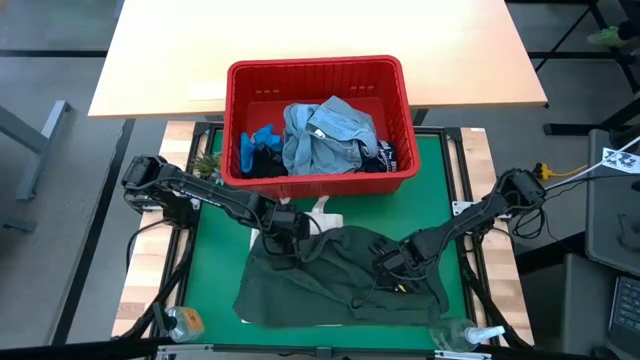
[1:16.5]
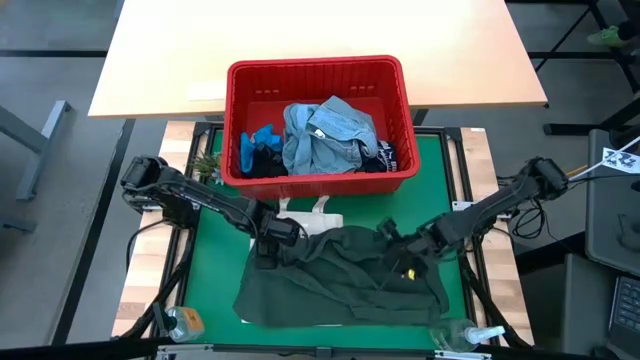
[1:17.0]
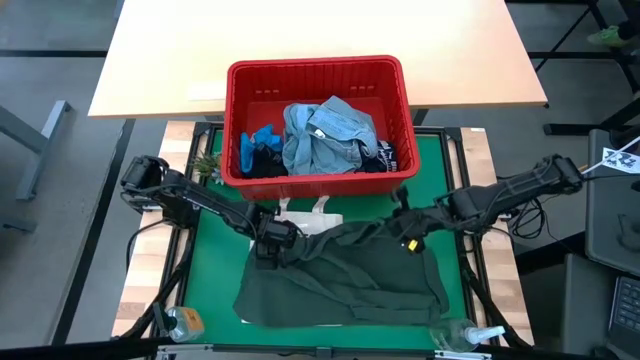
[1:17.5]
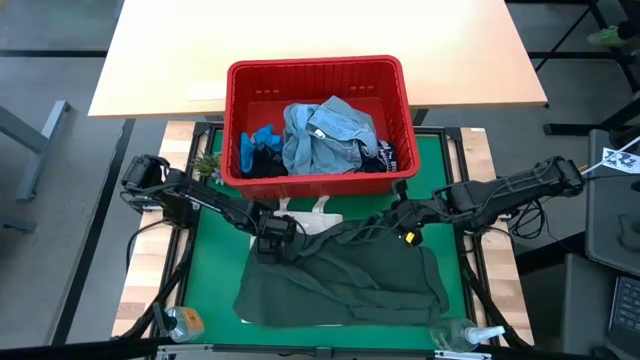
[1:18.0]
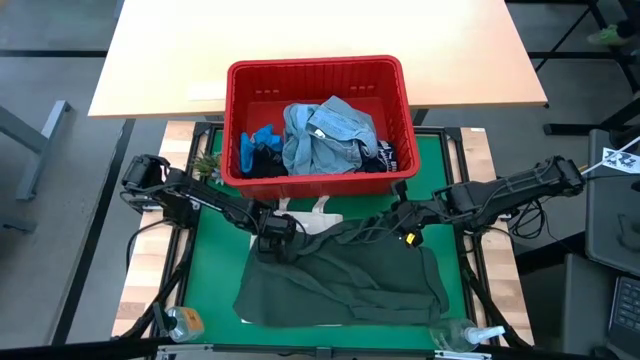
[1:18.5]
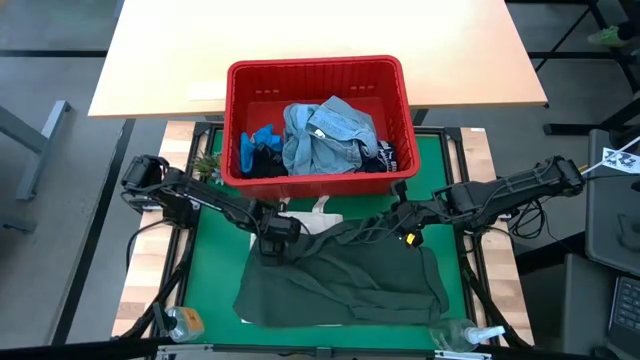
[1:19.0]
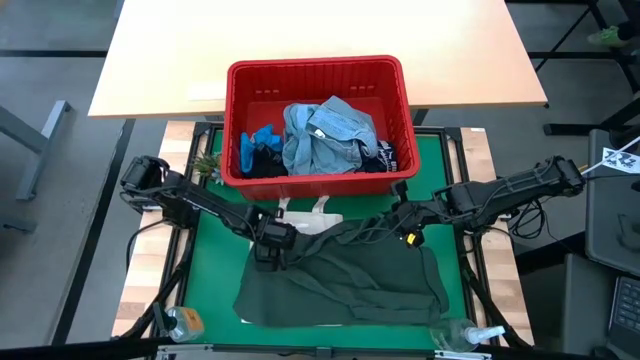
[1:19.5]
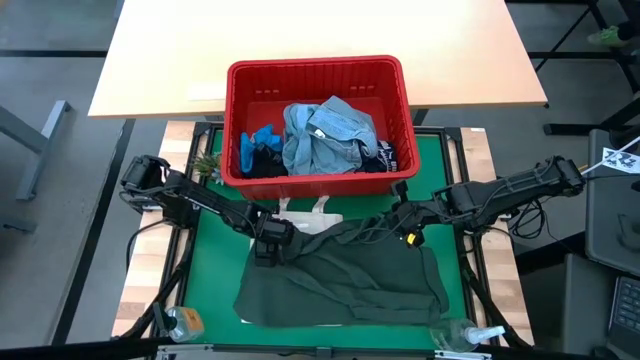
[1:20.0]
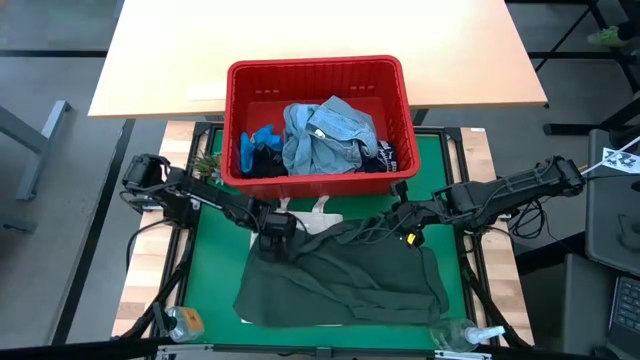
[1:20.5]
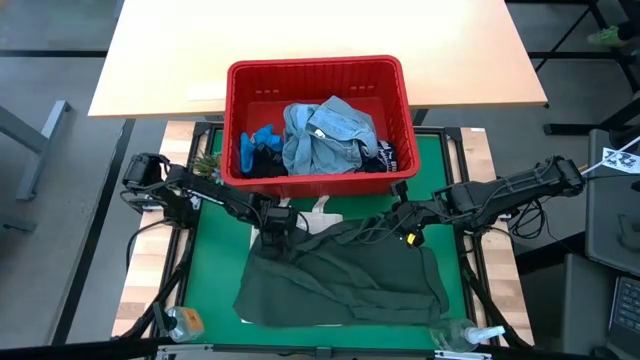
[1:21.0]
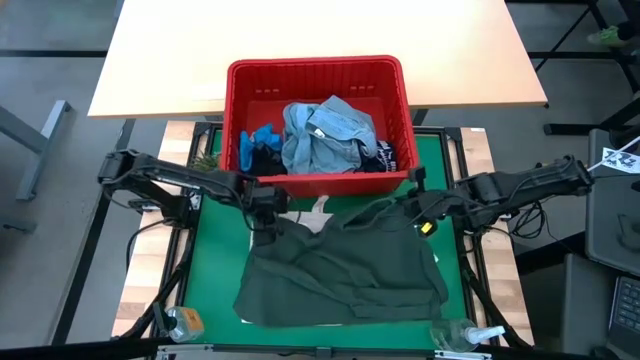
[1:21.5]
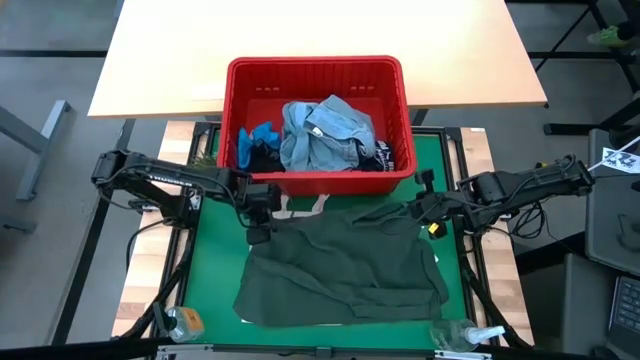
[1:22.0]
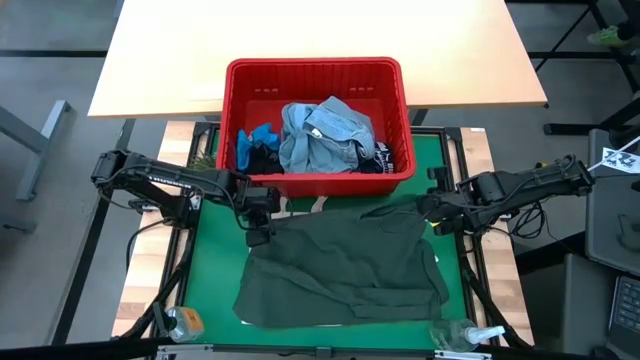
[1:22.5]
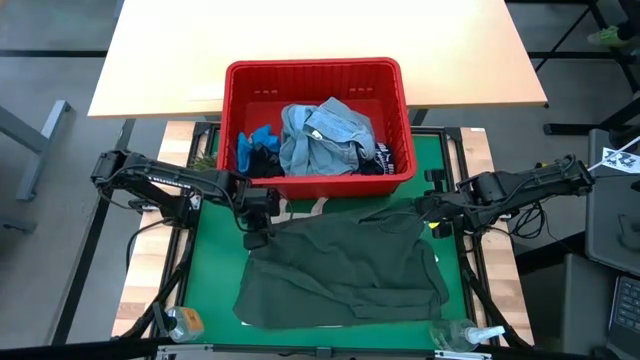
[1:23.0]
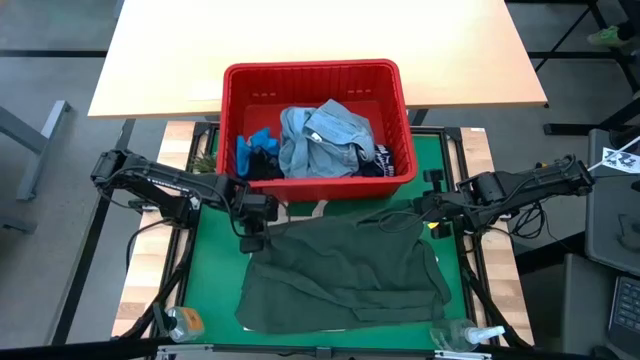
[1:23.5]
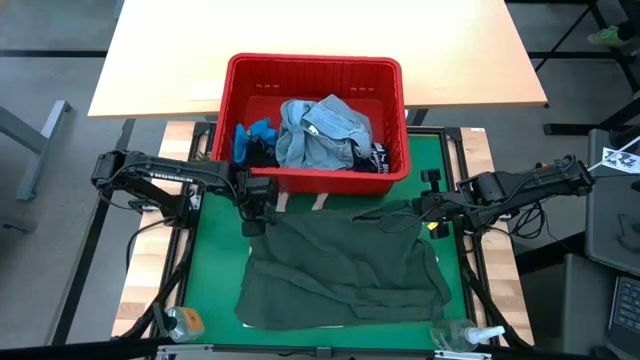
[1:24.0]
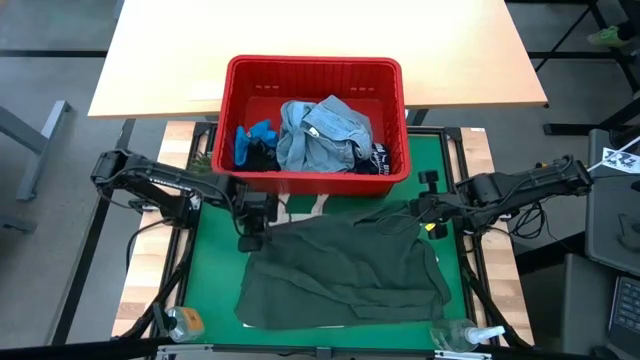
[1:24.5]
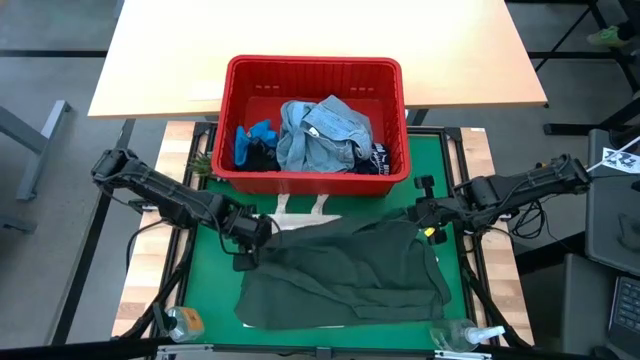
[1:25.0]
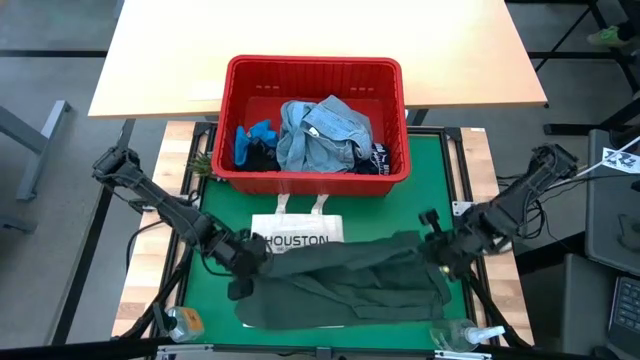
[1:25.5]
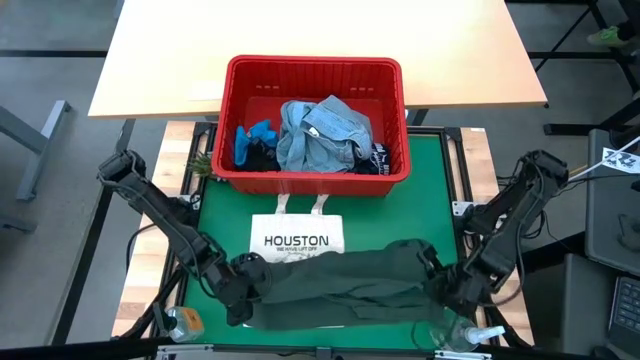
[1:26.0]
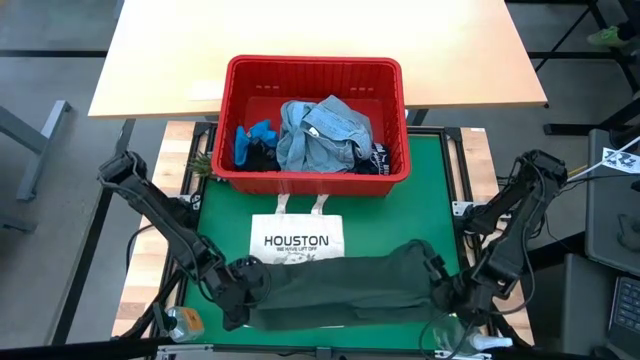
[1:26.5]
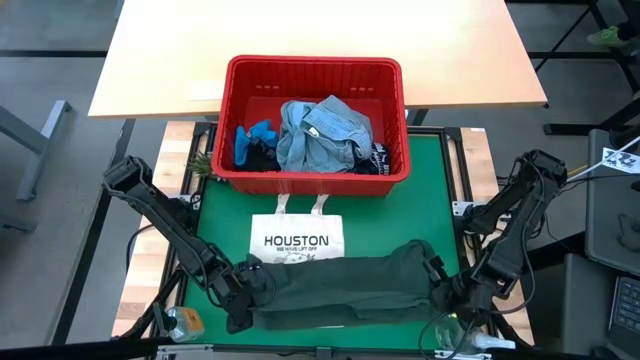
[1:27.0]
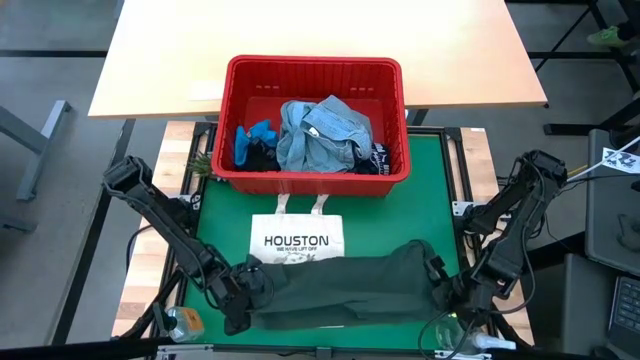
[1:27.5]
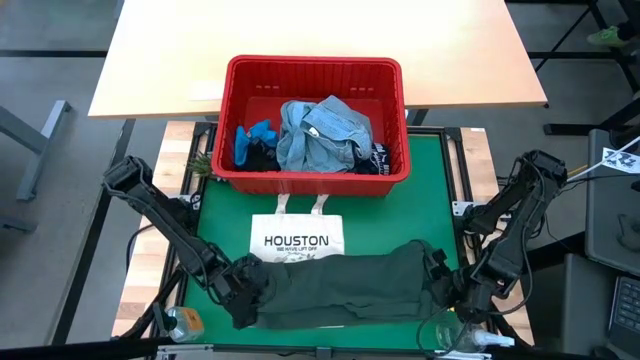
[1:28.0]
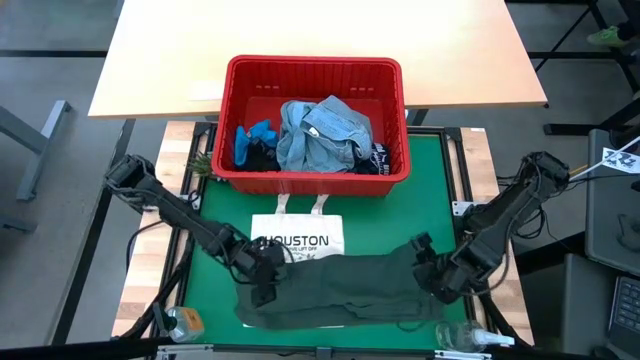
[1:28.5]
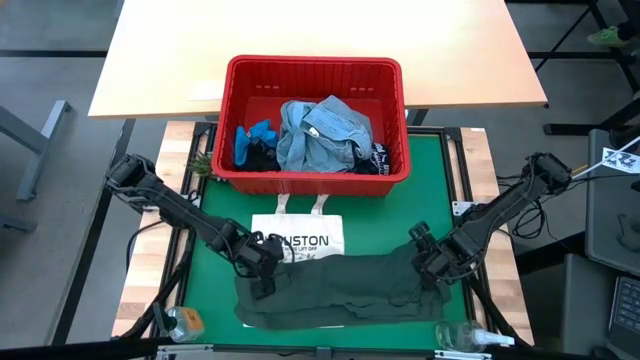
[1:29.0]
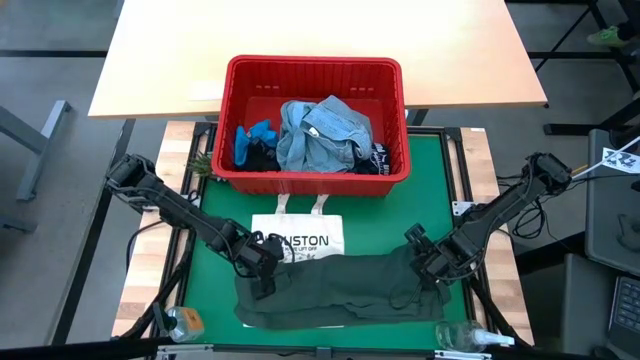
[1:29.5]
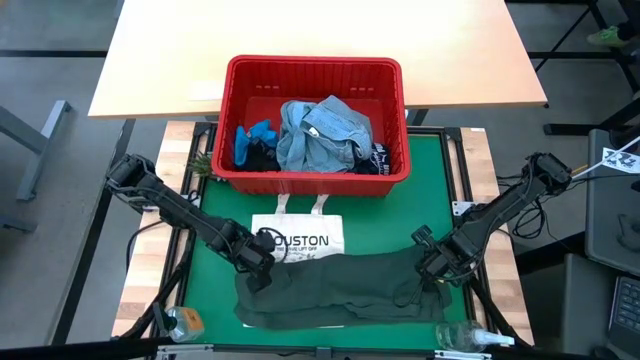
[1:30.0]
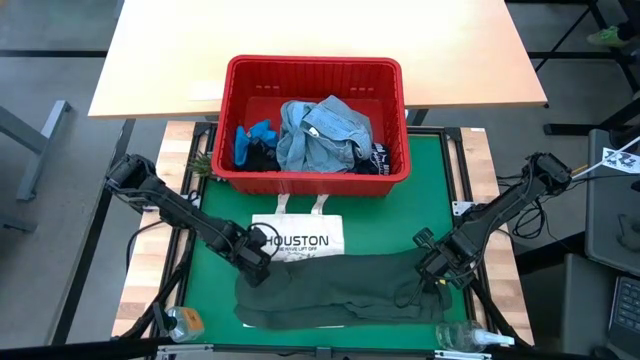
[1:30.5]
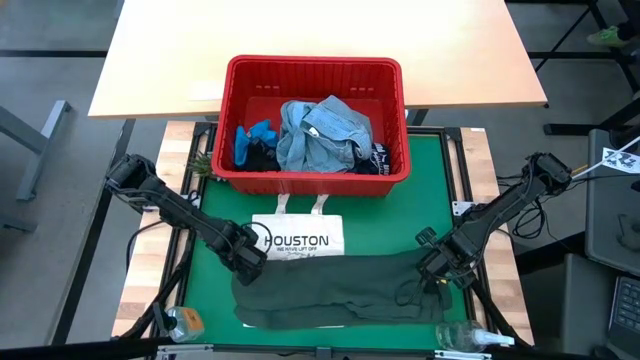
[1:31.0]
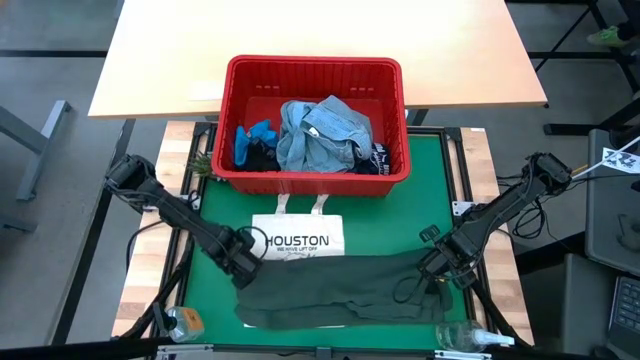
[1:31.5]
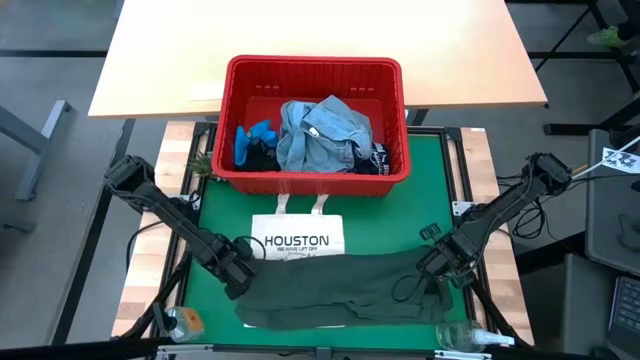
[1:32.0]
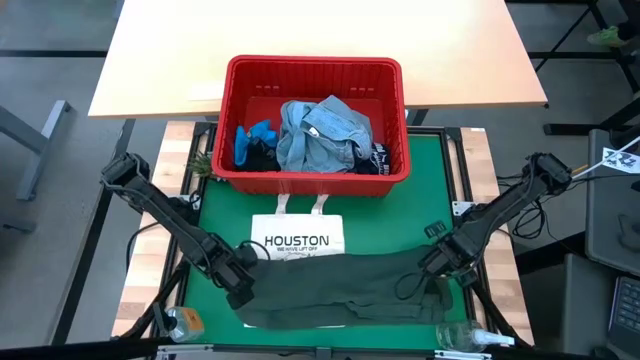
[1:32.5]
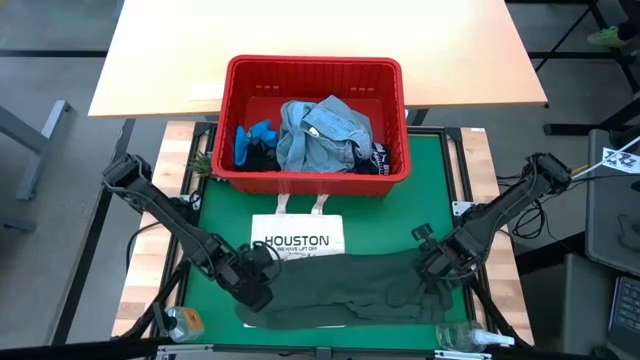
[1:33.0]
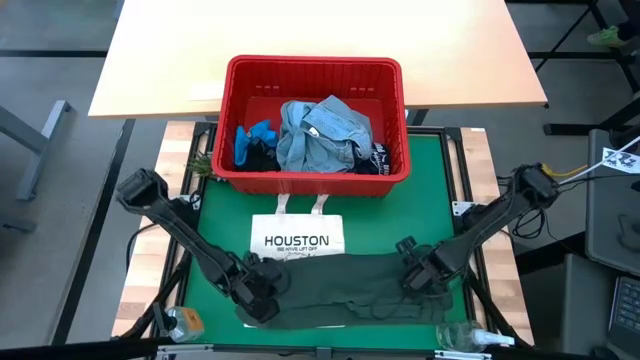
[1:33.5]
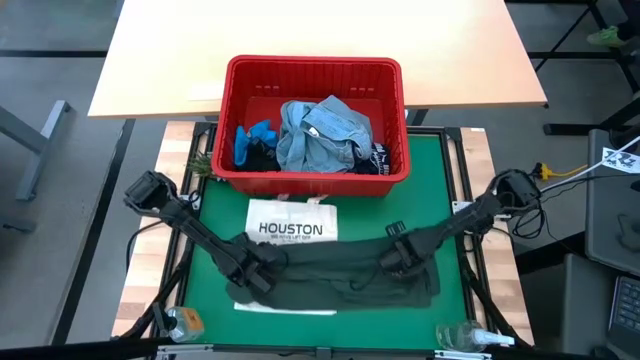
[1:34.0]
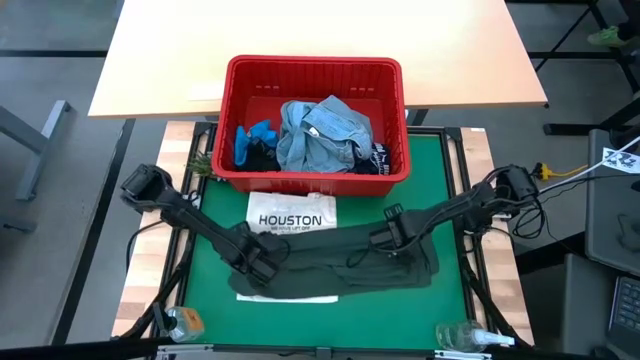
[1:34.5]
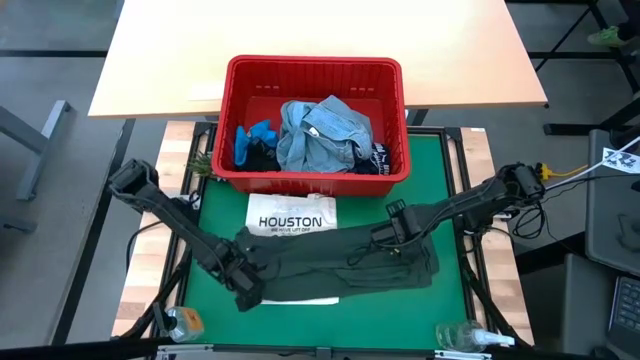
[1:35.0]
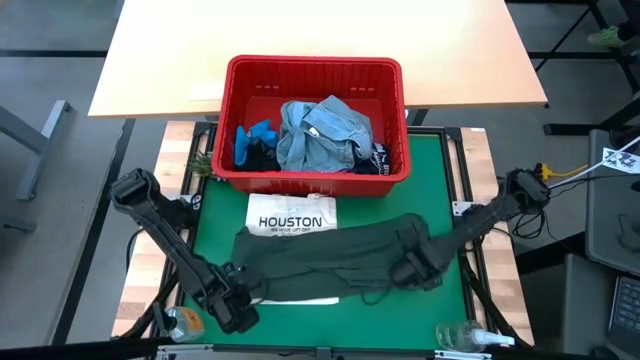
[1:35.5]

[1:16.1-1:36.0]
Task: Fold Laundry from Bin
Fold the green t-shirt
